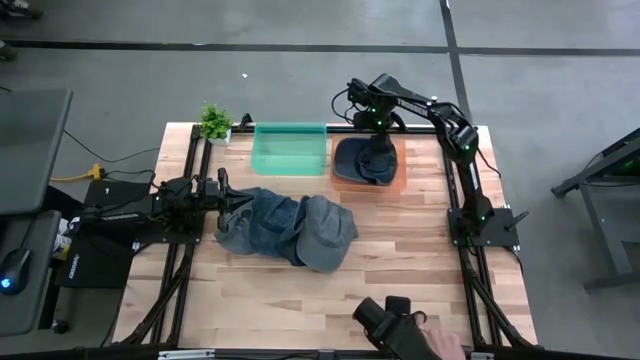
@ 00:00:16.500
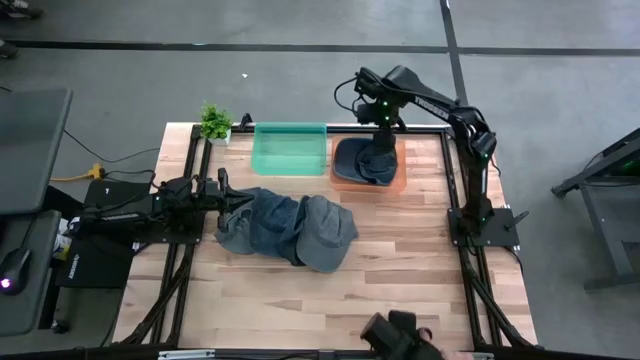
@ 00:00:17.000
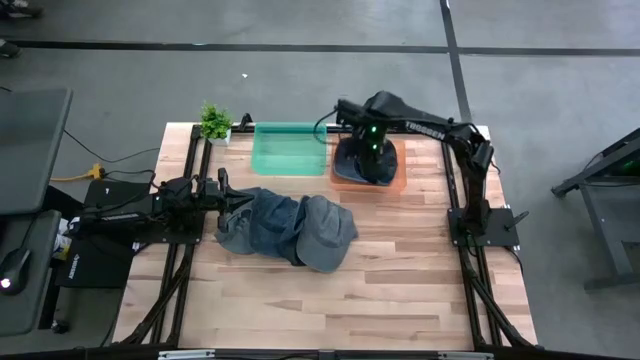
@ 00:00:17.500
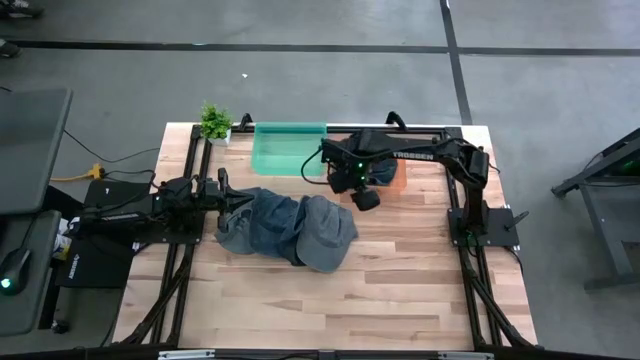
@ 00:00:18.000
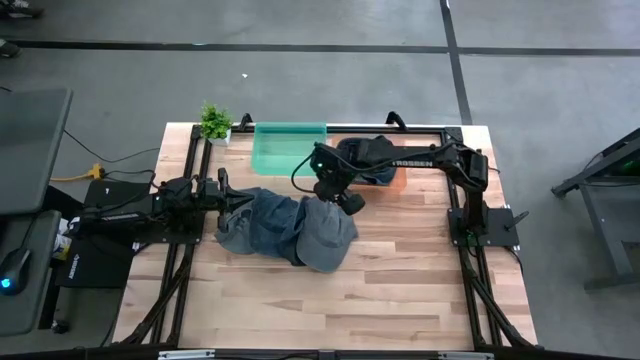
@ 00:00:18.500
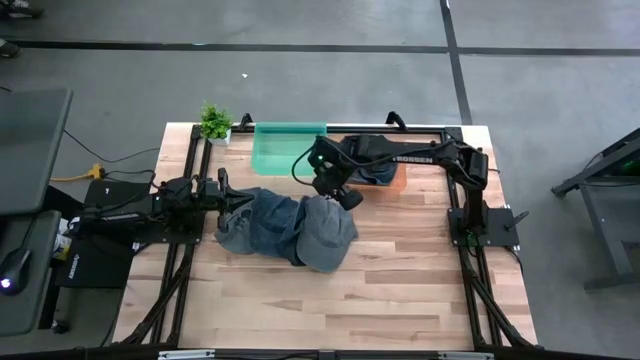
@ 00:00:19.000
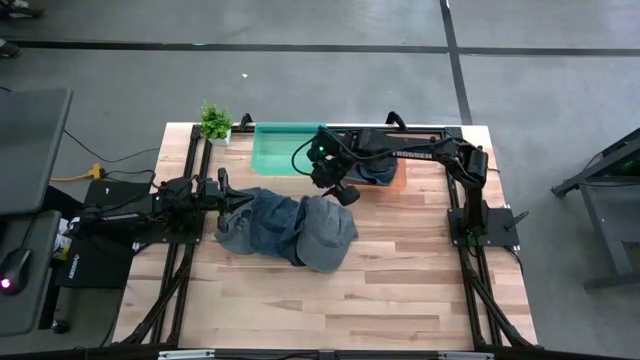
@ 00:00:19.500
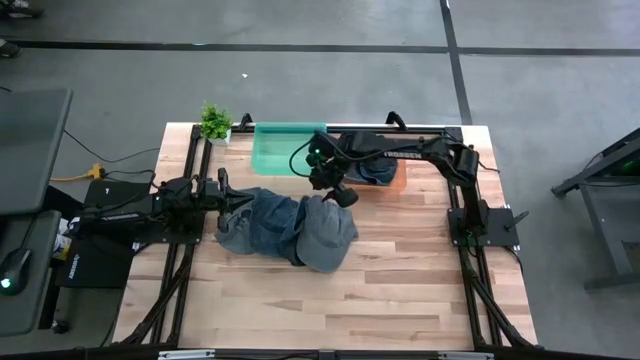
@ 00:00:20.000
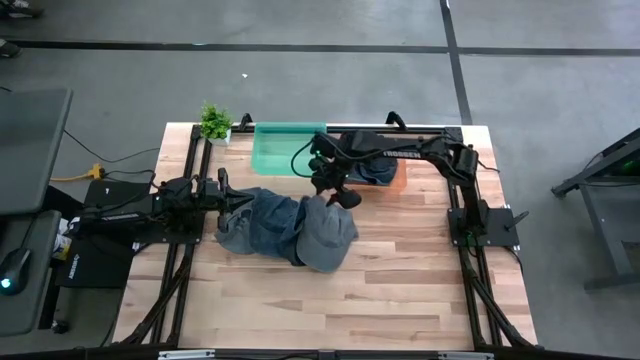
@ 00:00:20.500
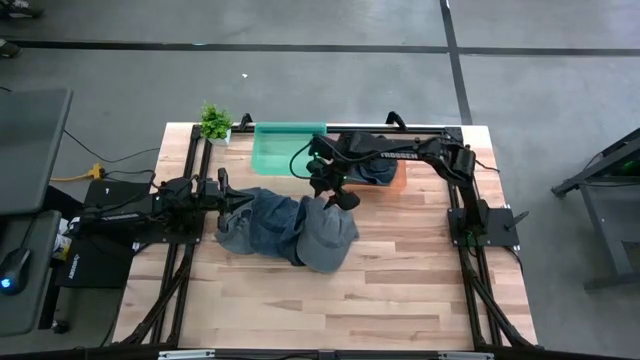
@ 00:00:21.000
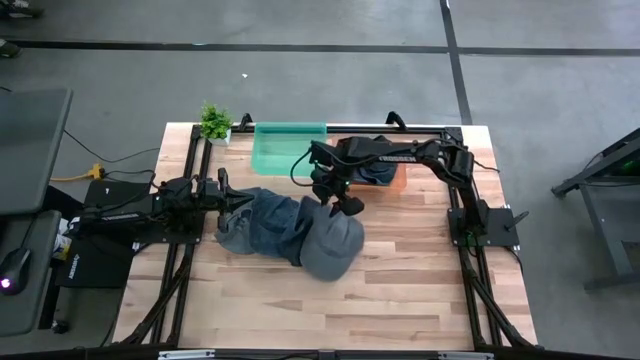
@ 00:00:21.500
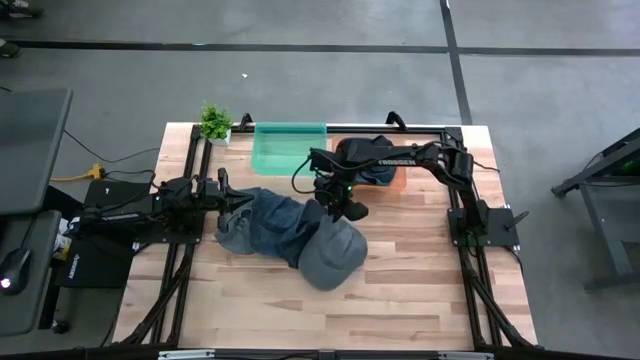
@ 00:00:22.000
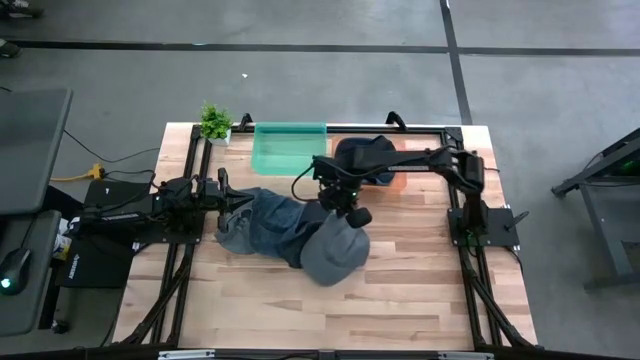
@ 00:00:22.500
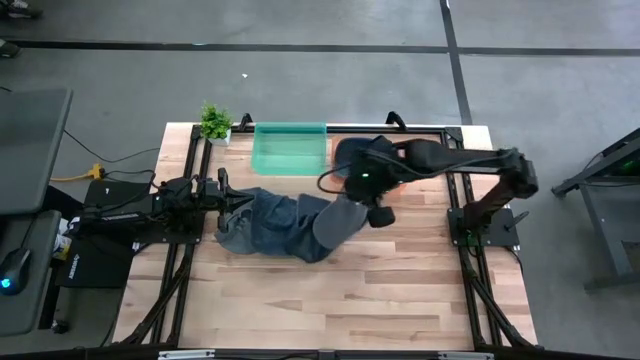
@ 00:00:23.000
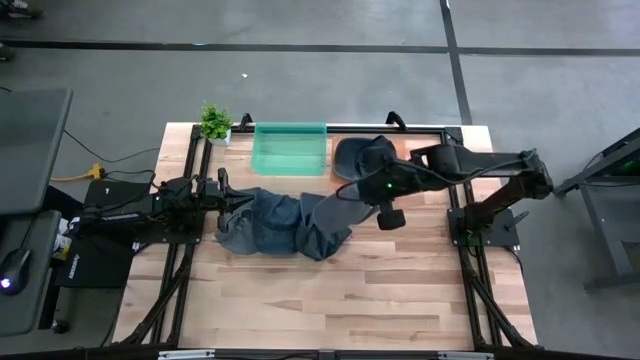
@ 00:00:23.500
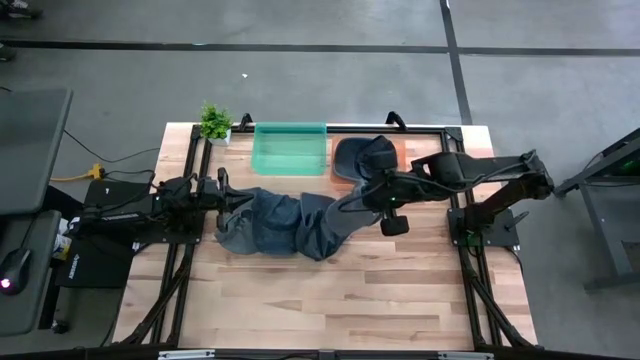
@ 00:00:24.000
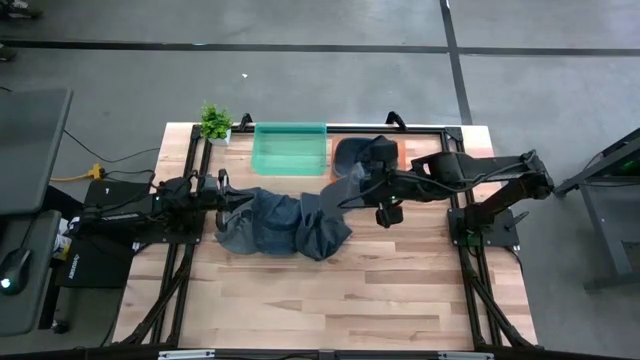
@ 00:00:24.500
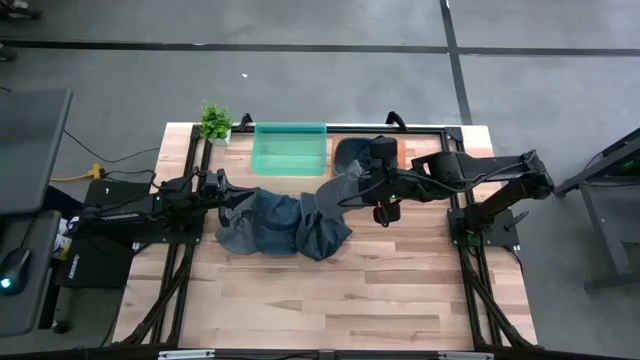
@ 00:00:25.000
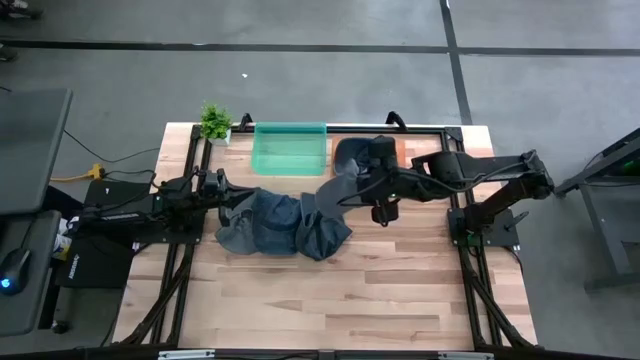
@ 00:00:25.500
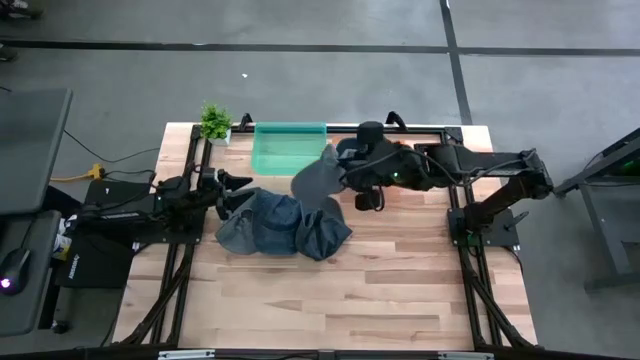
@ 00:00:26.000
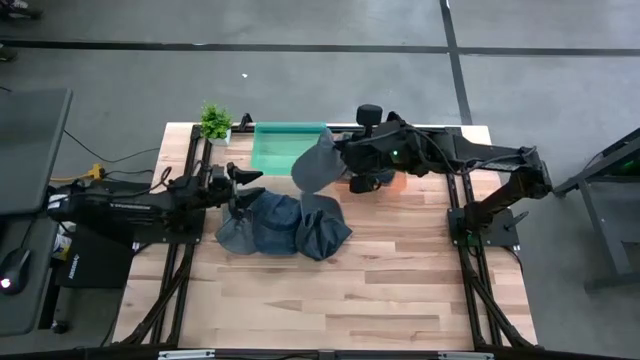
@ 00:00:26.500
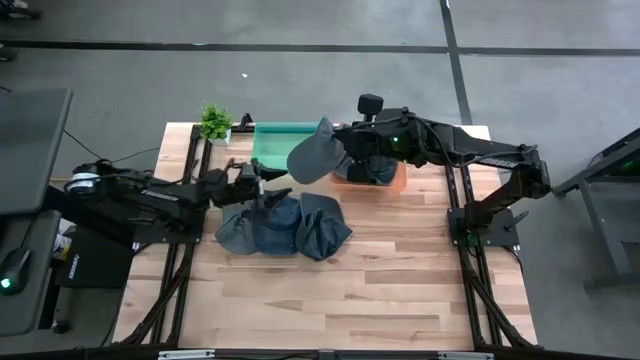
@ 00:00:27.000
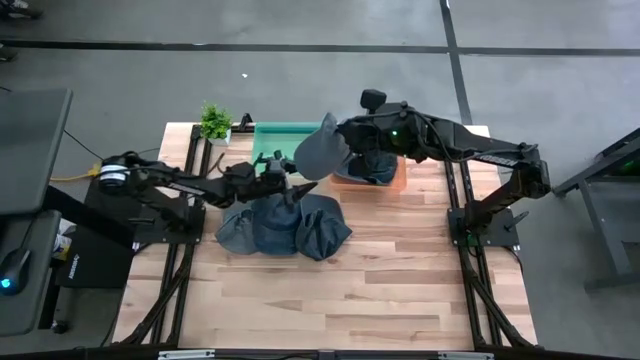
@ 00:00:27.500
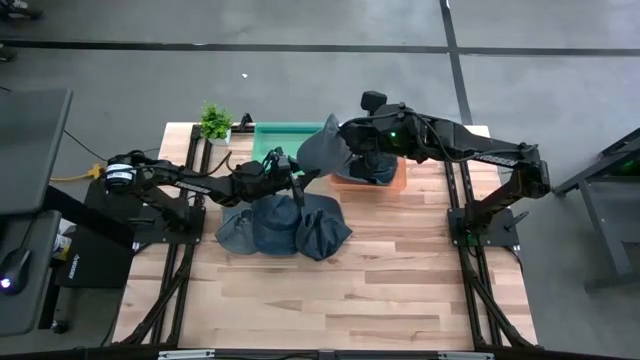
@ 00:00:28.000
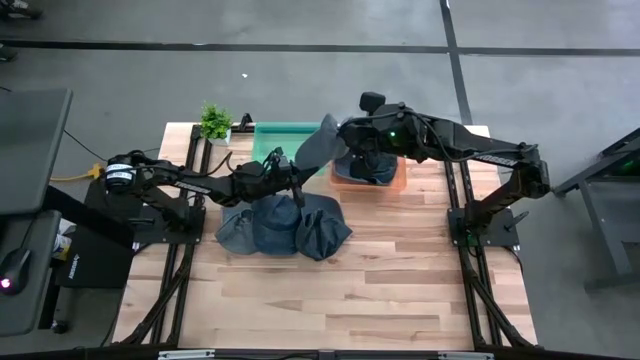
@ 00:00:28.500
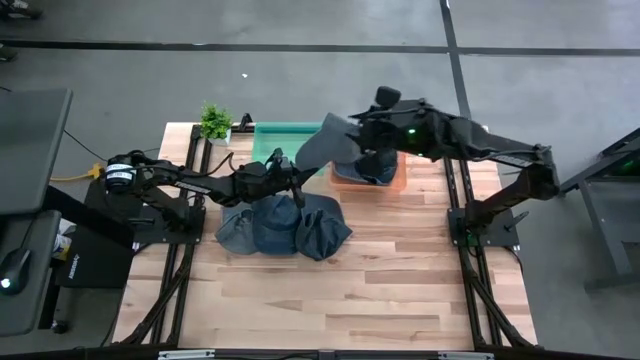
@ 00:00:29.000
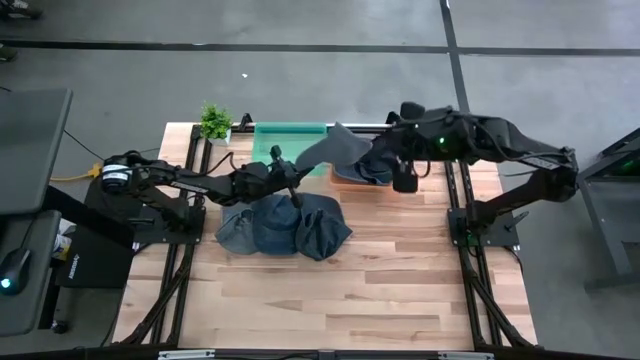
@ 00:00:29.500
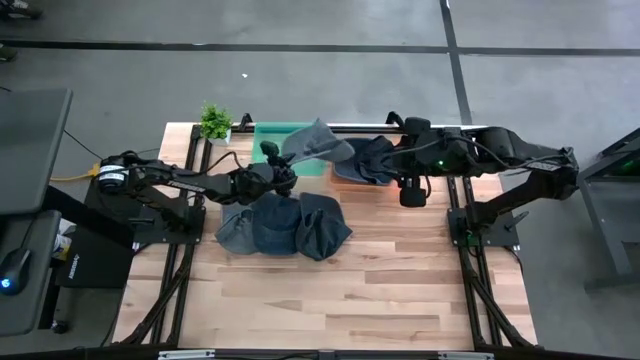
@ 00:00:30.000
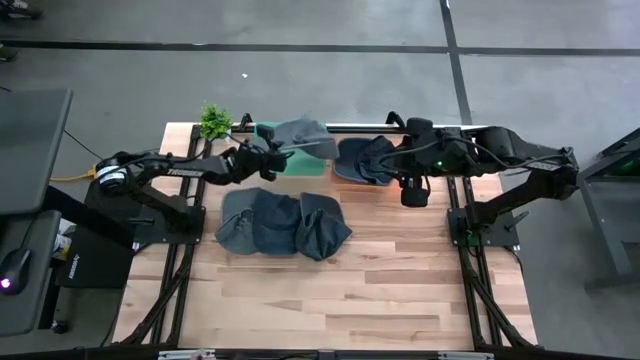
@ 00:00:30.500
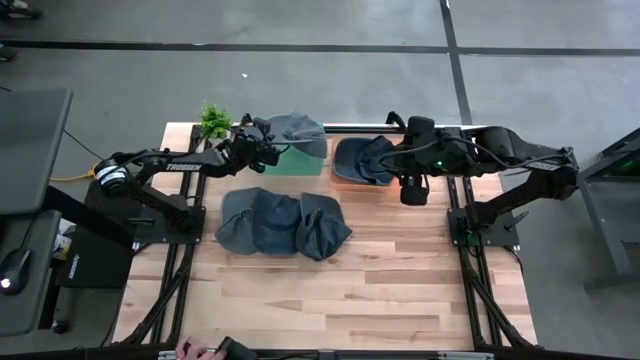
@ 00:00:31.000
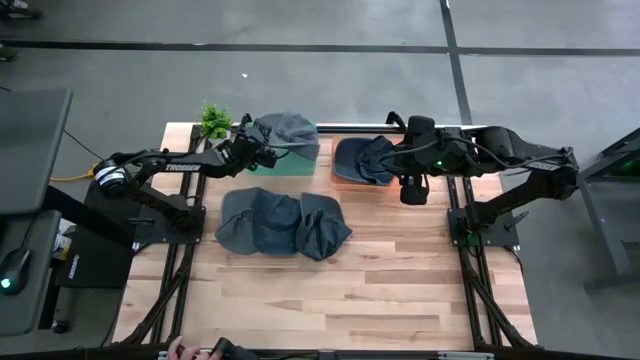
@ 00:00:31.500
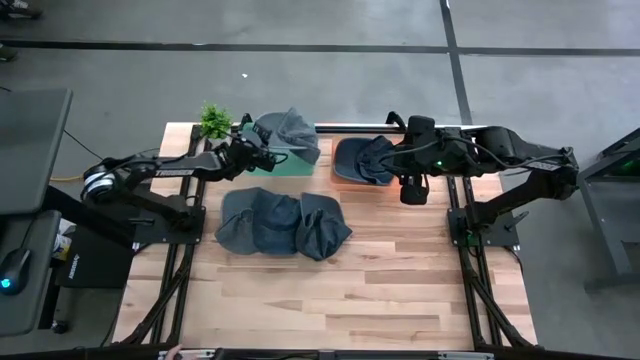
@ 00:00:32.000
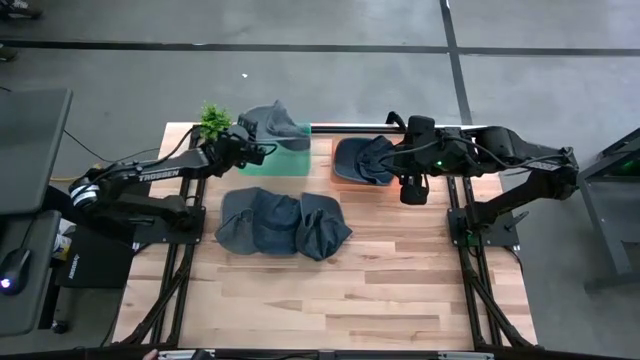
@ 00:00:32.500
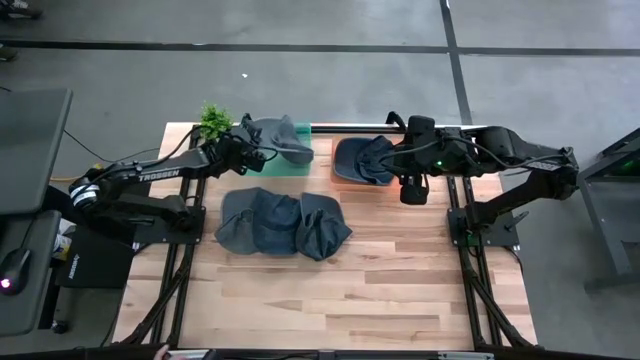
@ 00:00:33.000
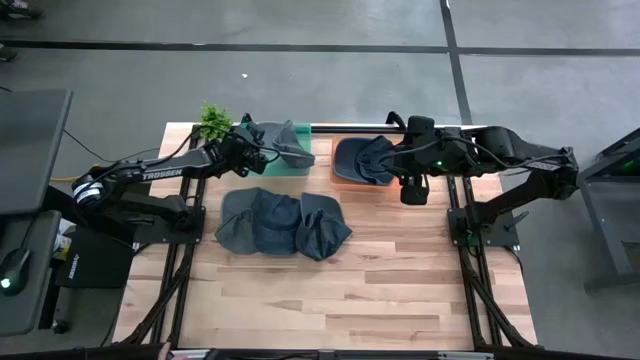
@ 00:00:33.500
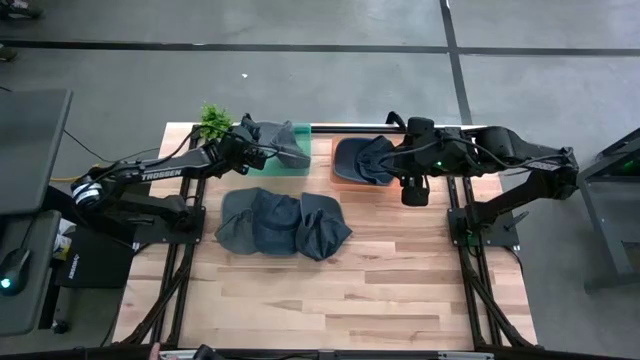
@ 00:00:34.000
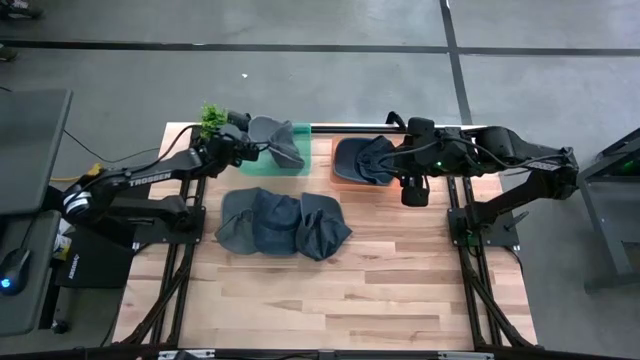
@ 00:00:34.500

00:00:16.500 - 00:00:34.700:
Task: Pick & Place hat
Put the right gray cap into the green bin

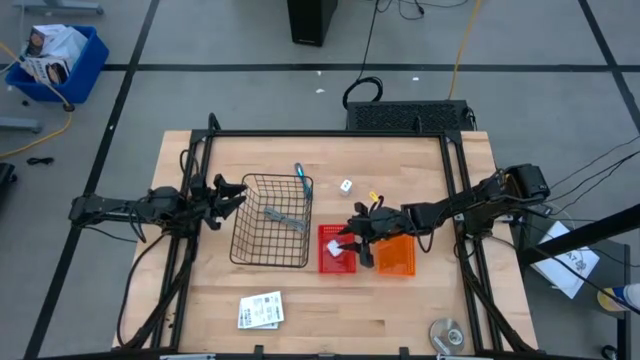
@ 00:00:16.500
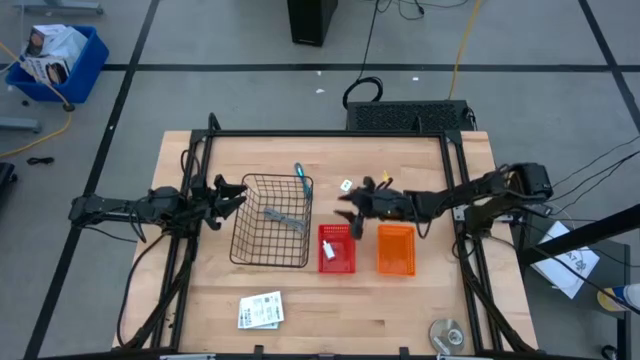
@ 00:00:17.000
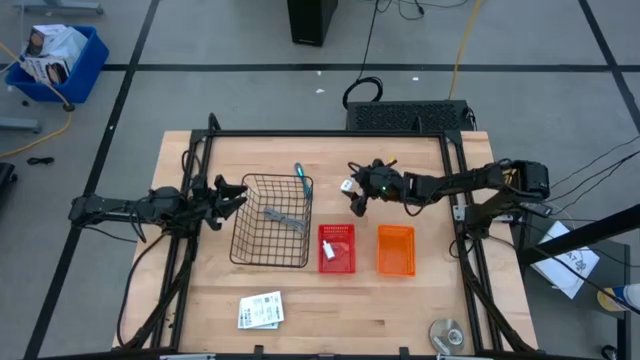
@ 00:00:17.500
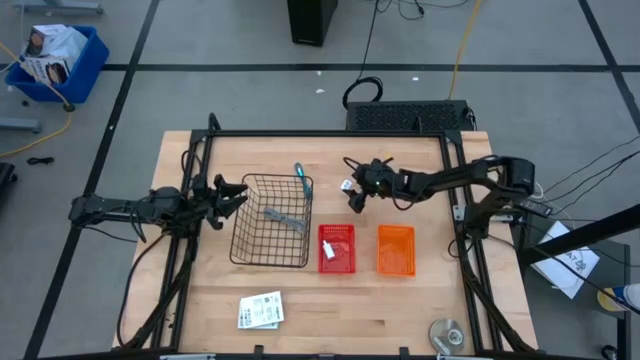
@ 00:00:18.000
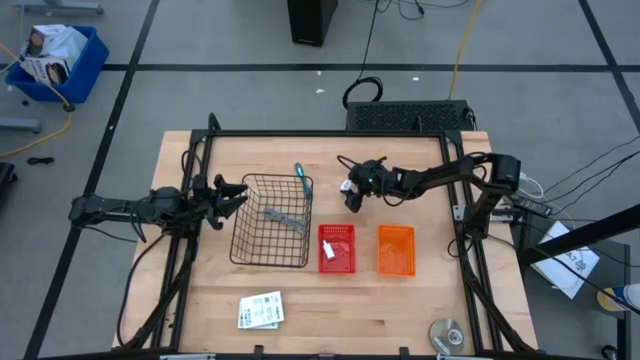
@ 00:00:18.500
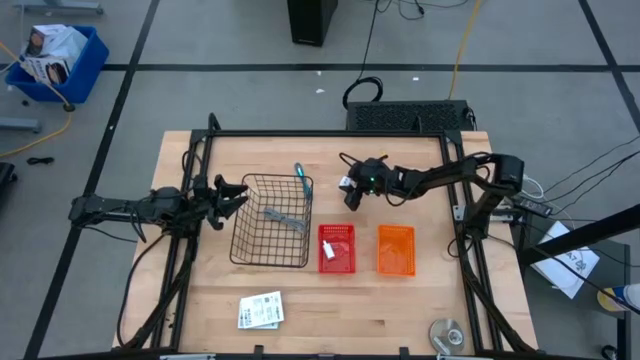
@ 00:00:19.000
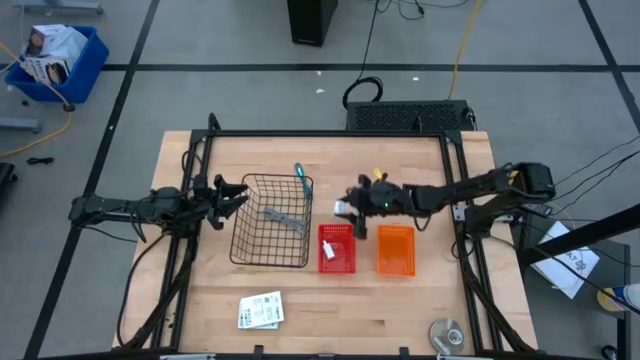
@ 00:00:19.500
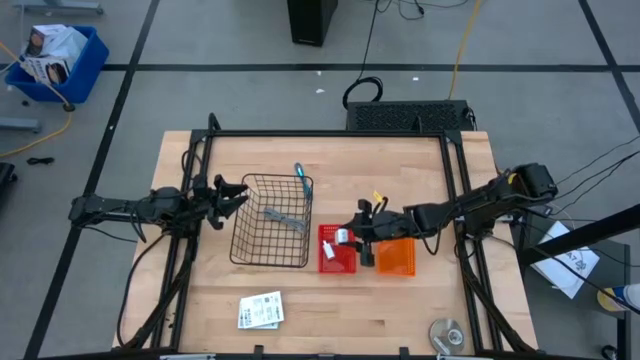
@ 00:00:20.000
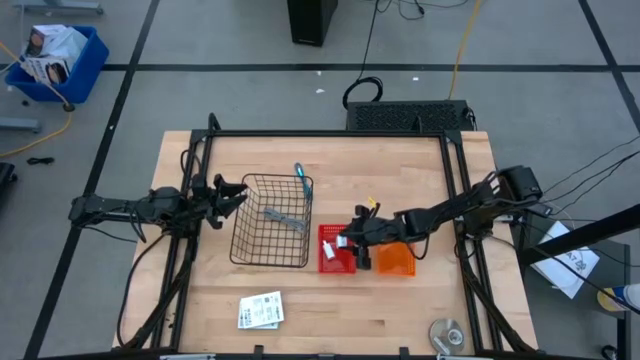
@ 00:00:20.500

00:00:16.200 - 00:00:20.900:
Task: Pick and place items into bin
Put the white adapter into the red bin
